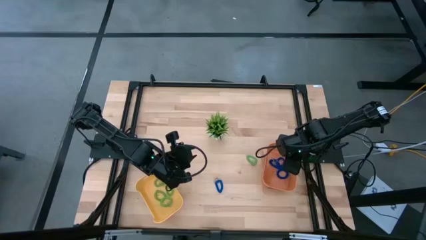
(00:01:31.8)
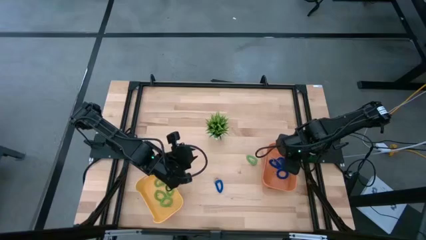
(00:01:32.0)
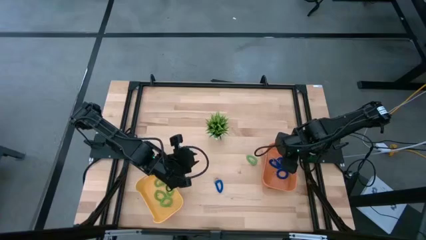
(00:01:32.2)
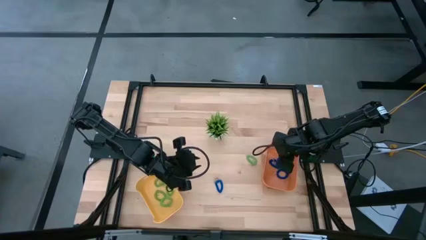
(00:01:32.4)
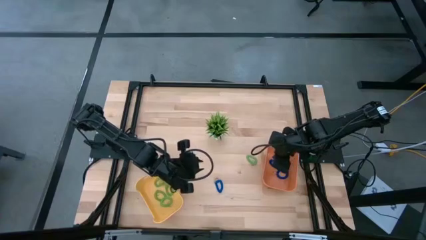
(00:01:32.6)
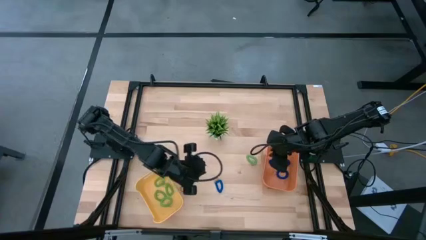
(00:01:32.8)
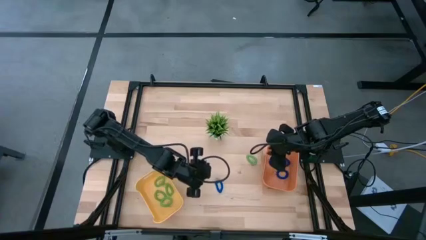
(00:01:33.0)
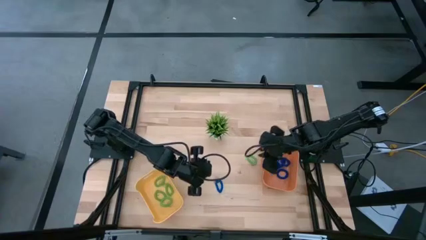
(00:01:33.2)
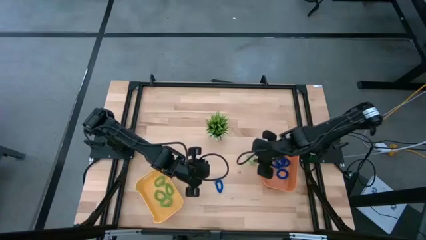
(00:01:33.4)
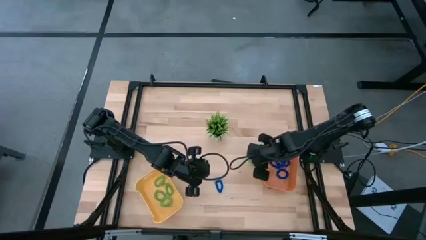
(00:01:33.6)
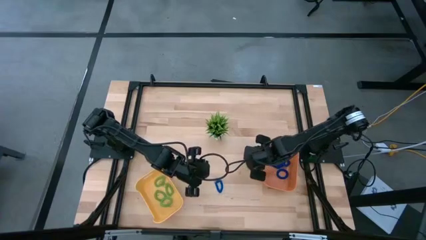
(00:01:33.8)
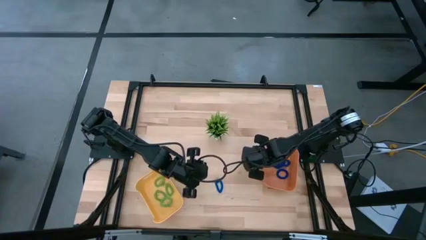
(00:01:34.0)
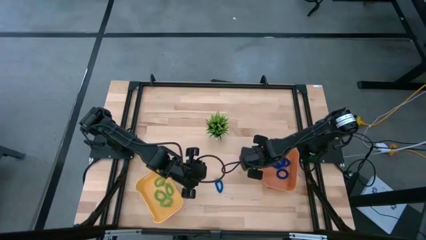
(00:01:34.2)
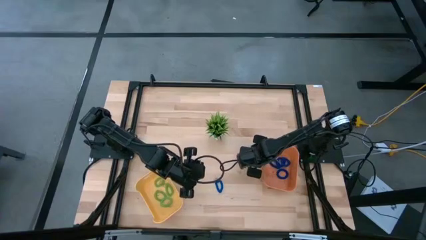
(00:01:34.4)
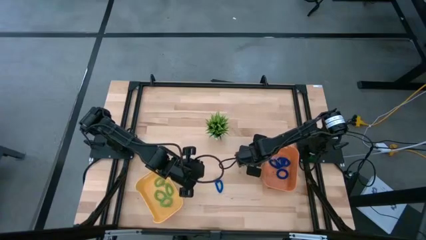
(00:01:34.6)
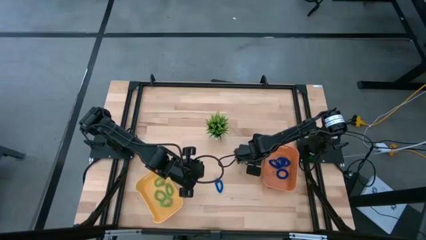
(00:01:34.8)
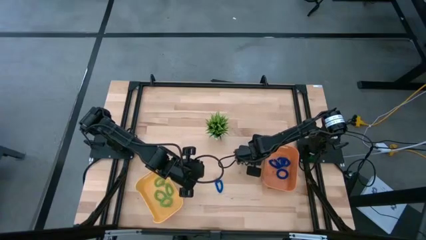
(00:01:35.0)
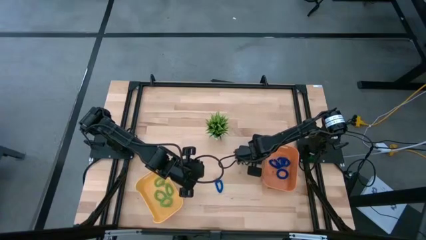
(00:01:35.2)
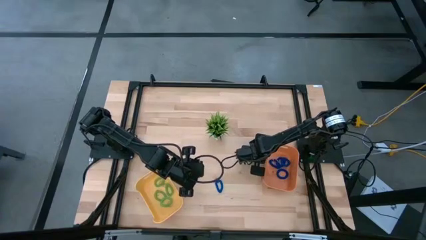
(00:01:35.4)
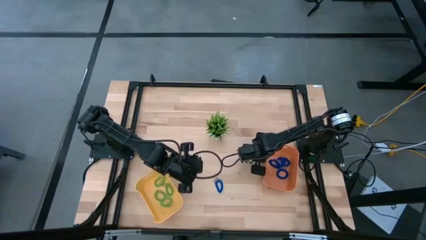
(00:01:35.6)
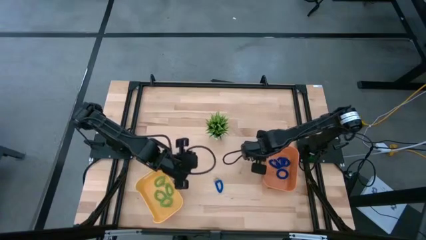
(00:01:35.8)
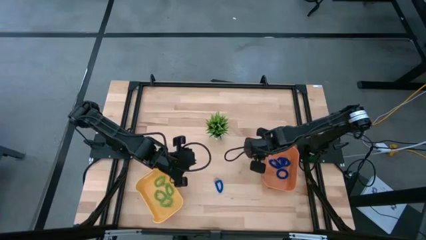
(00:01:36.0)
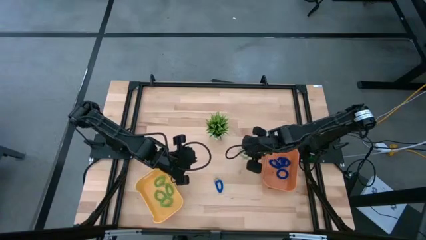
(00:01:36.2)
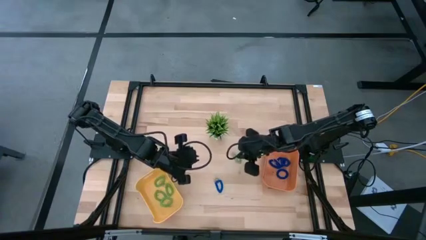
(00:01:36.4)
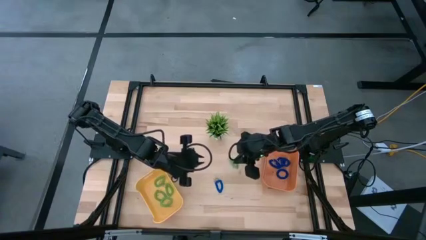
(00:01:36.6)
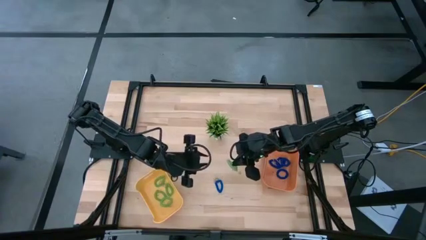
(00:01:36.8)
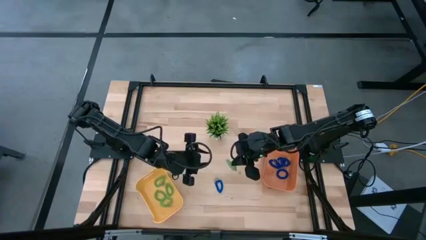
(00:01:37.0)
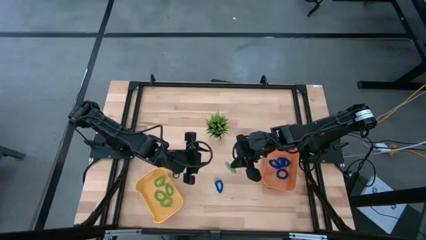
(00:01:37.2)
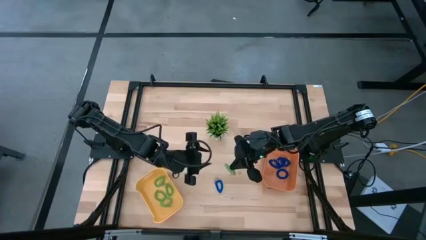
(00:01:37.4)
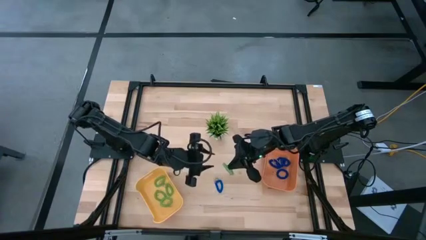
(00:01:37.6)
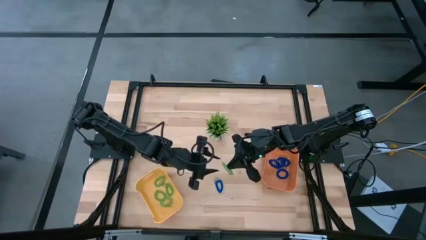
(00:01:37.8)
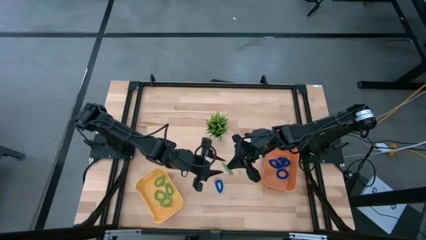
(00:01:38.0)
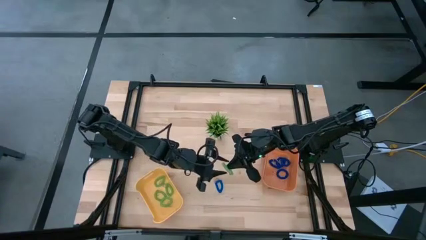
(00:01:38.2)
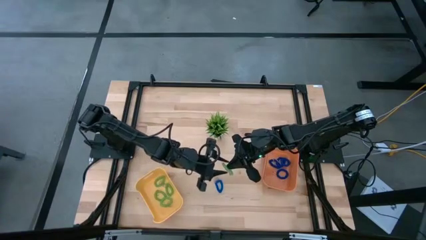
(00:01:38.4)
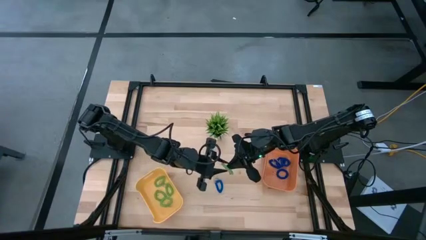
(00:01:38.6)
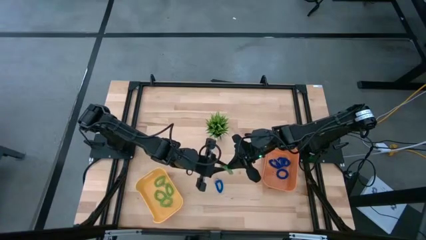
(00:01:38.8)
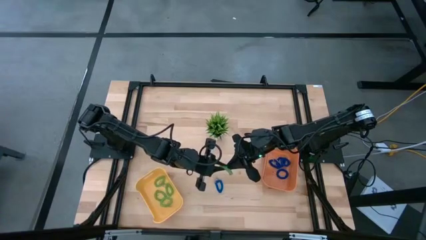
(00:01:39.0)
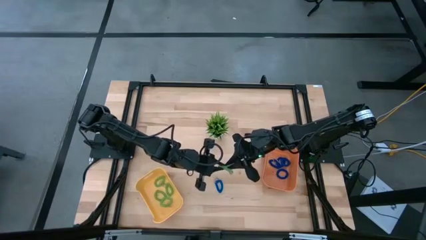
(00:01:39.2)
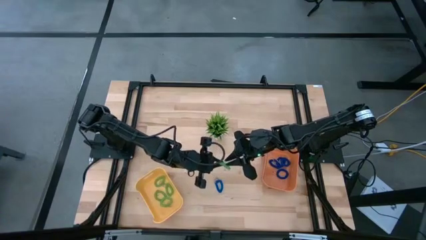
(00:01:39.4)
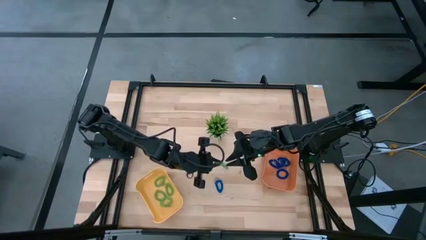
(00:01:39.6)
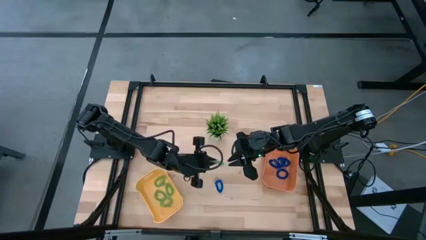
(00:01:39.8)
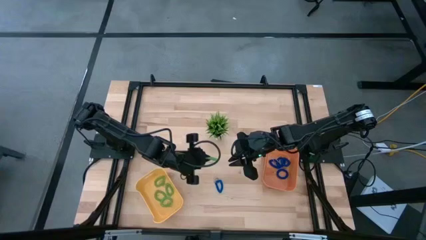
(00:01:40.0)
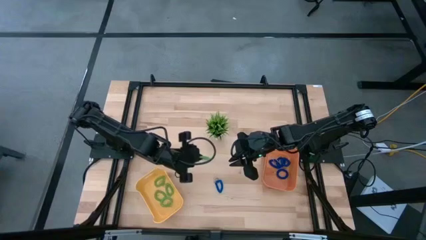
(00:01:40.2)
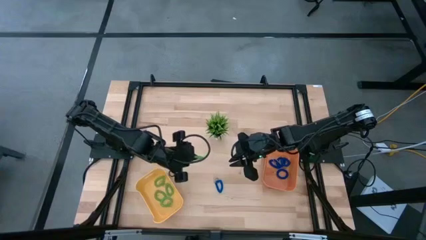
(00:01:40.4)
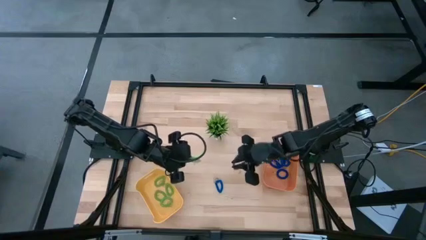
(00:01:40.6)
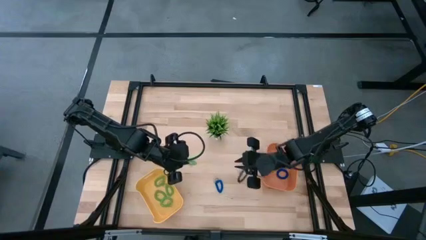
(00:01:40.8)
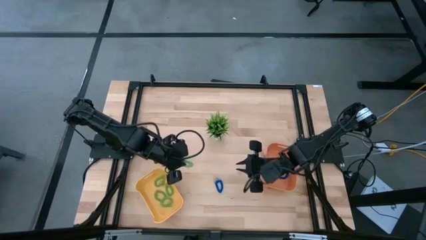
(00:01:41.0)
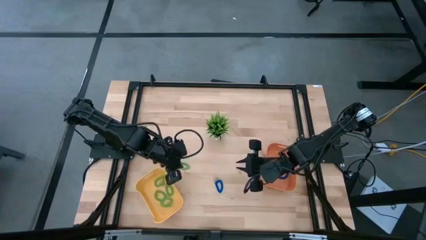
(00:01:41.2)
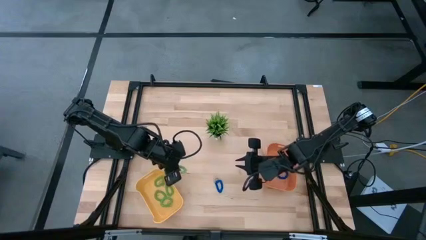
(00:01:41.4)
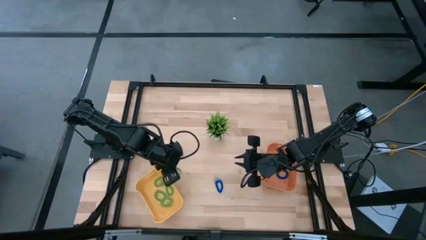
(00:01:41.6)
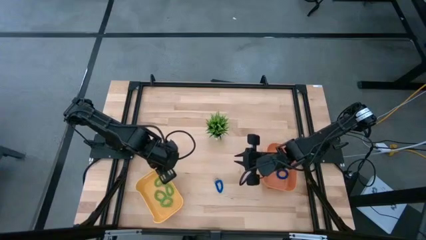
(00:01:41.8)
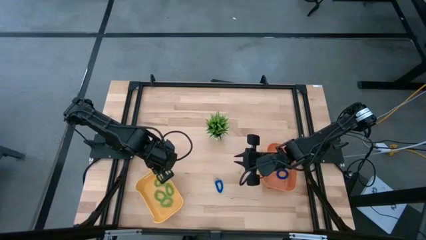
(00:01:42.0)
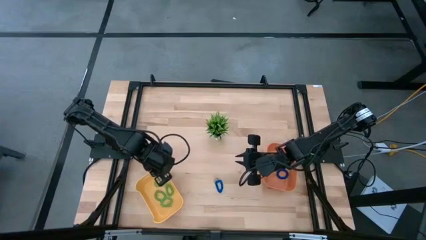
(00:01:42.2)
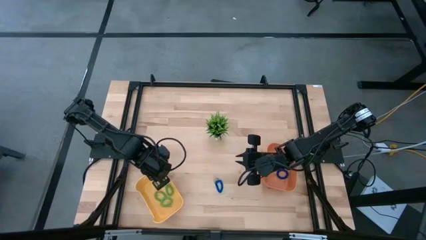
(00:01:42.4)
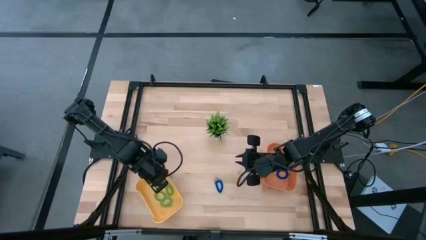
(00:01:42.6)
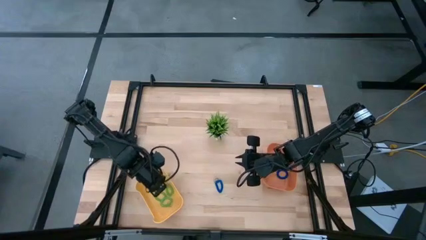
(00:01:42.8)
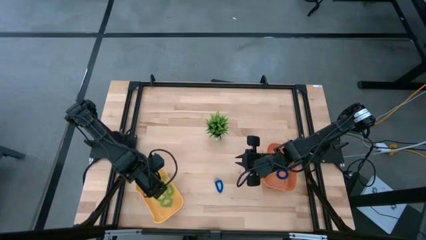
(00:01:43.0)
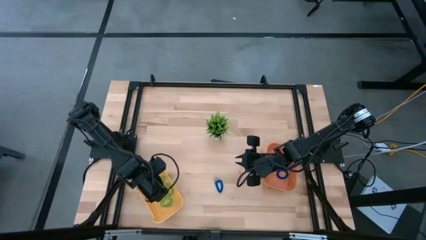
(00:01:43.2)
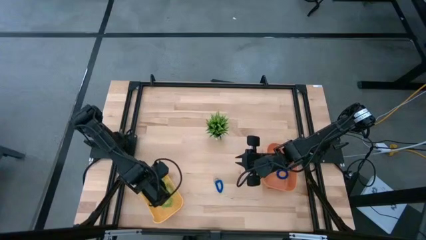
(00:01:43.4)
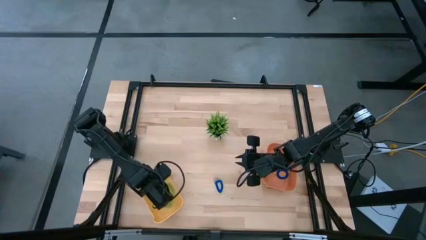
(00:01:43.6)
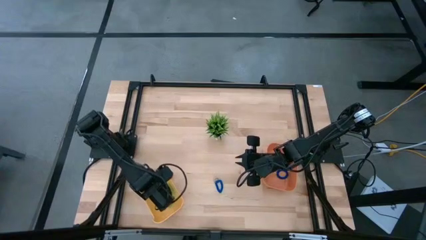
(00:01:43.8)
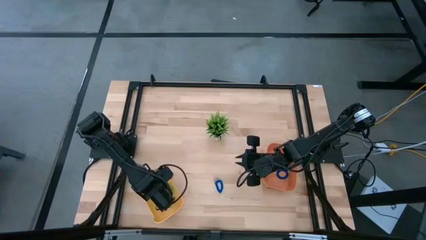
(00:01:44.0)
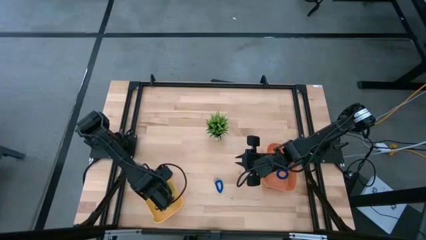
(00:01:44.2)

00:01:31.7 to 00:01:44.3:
Task: Sort spring keychains
Put the green spring keychain into the yellow bin

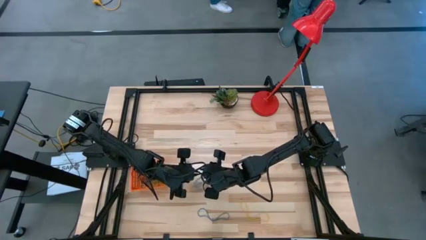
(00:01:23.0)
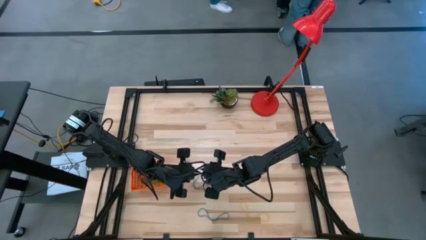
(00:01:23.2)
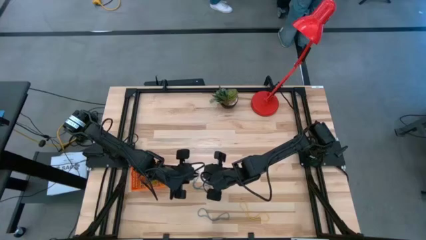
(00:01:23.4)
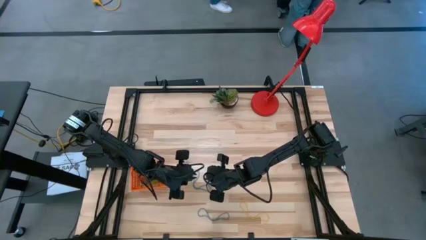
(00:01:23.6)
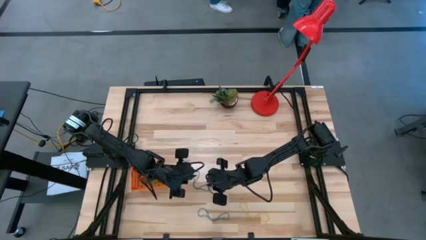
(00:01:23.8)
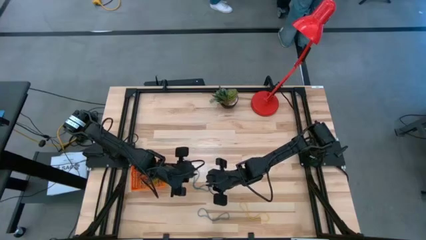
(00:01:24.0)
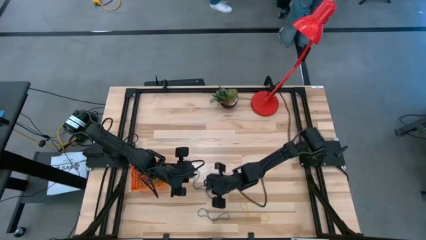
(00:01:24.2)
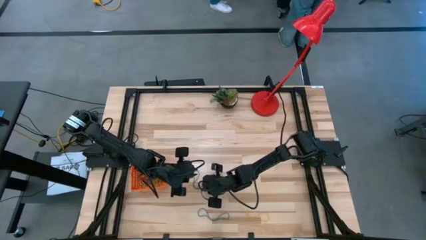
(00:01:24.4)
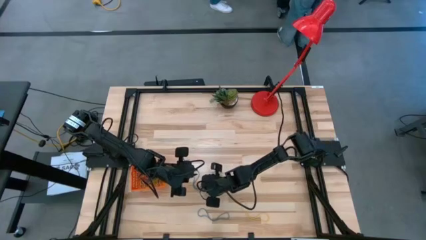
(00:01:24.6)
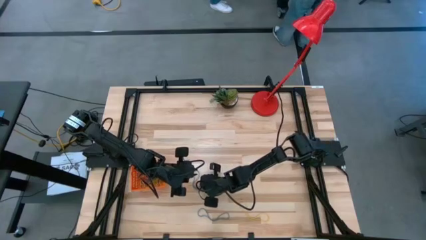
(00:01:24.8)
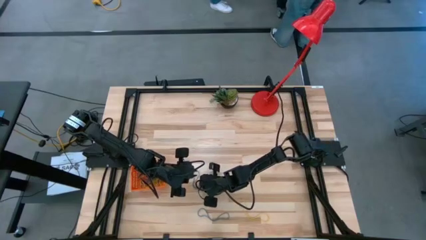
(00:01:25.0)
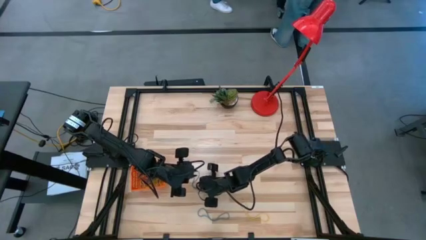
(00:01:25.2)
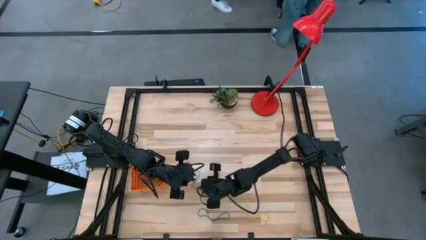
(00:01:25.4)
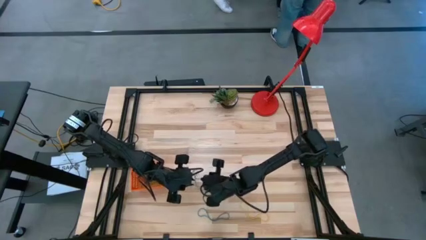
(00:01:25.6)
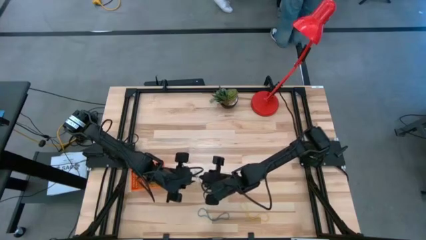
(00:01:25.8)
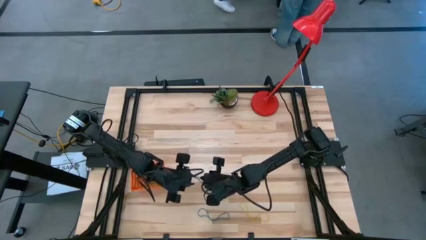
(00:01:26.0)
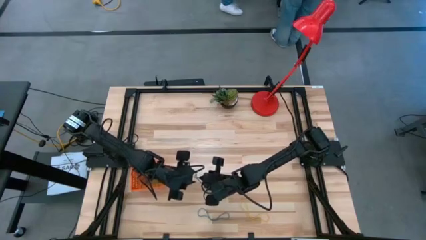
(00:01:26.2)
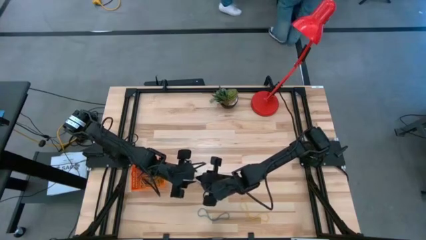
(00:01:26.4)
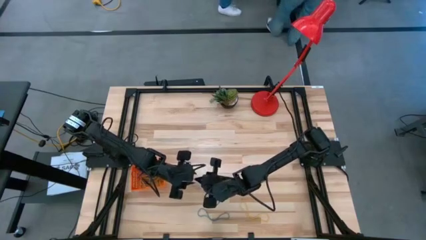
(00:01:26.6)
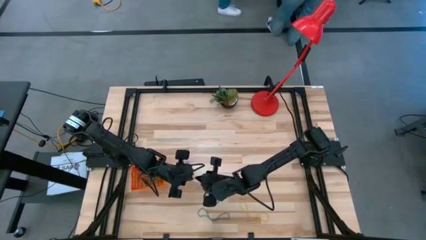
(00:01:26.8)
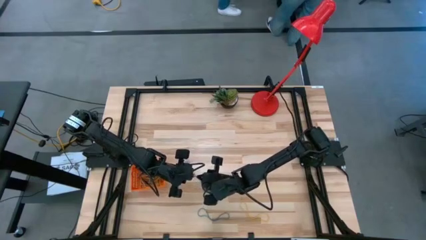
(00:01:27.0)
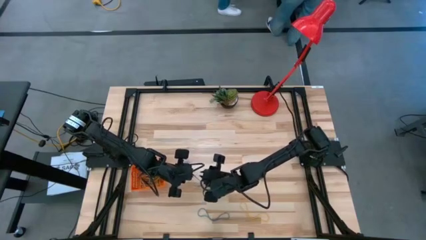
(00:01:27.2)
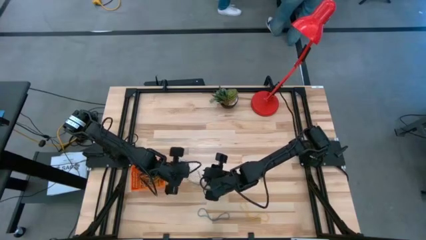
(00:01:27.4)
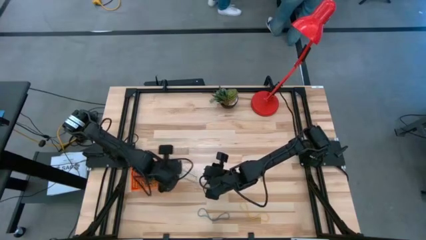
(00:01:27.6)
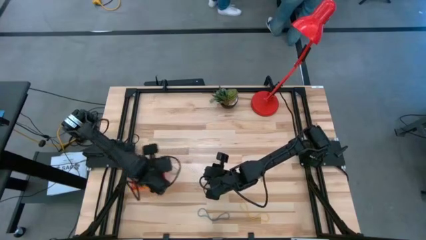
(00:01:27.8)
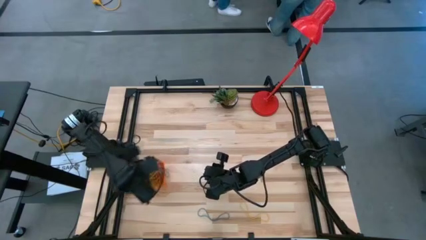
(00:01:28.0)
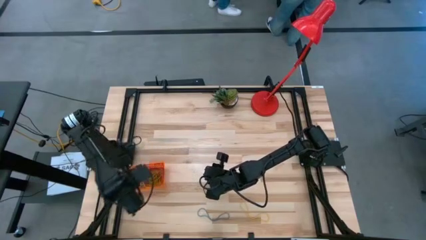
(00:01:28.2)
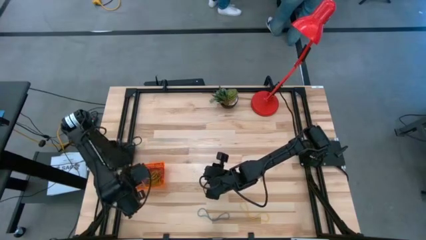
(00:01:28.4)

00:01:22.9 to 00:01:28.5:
Task: Pick and place rubber bands into bin
Put the blue rubber band into the orange basket
